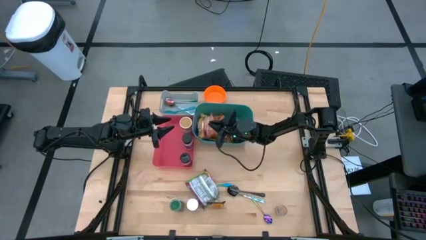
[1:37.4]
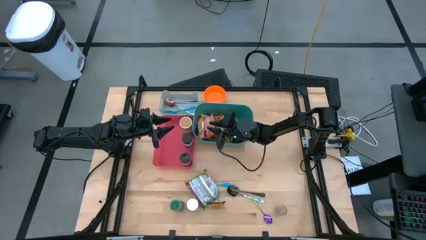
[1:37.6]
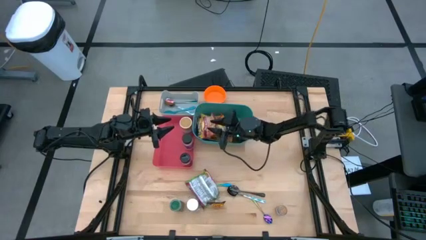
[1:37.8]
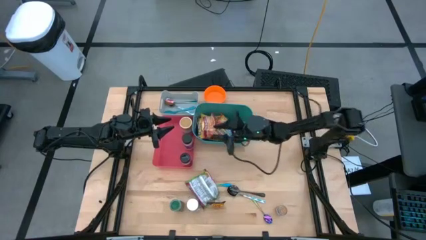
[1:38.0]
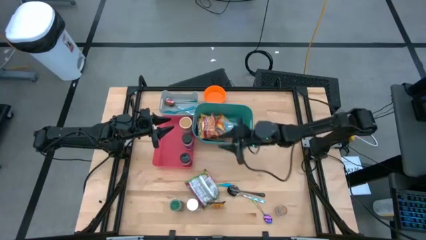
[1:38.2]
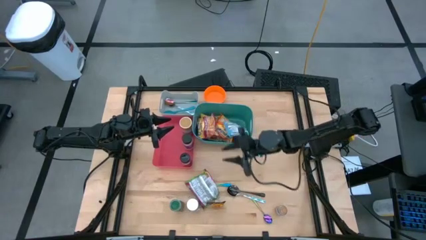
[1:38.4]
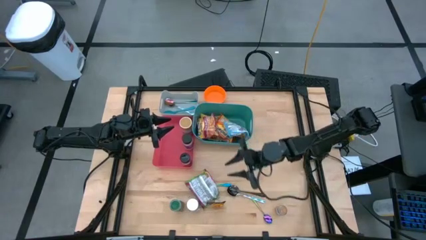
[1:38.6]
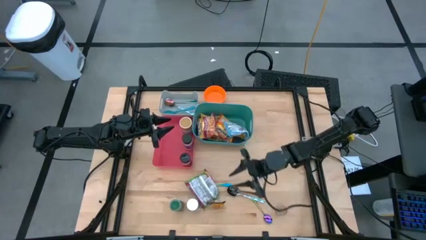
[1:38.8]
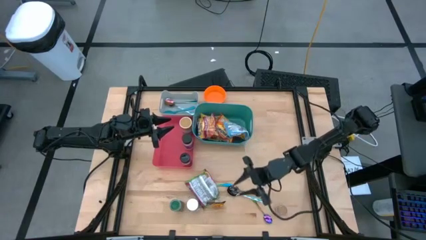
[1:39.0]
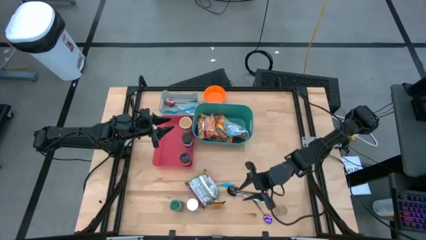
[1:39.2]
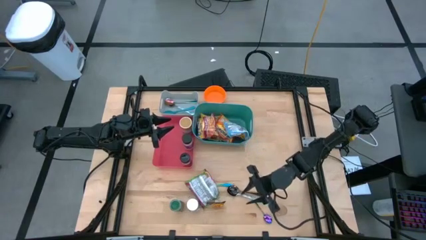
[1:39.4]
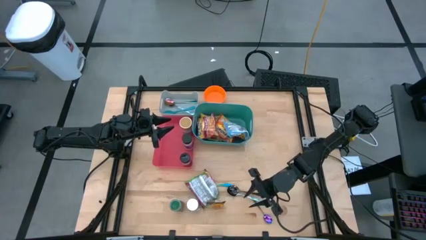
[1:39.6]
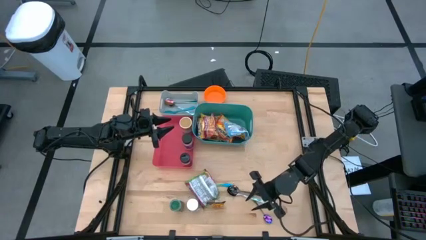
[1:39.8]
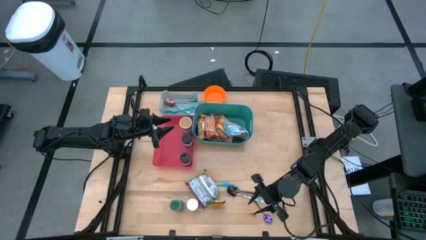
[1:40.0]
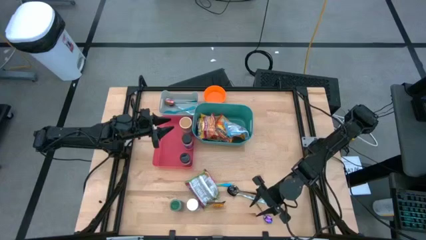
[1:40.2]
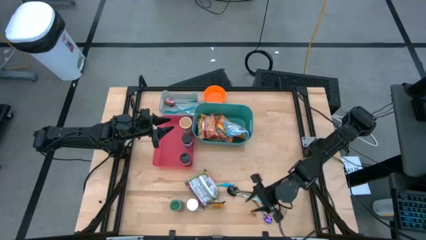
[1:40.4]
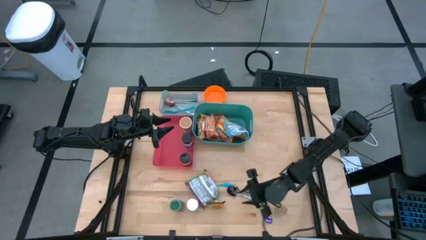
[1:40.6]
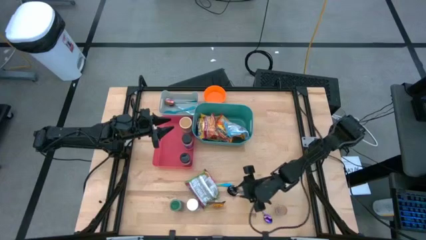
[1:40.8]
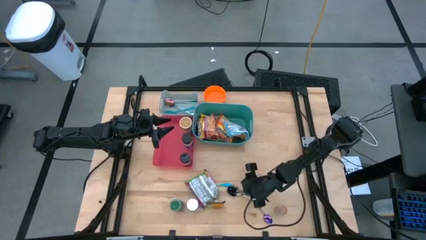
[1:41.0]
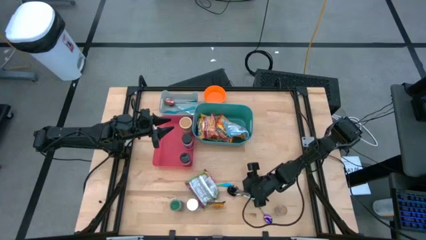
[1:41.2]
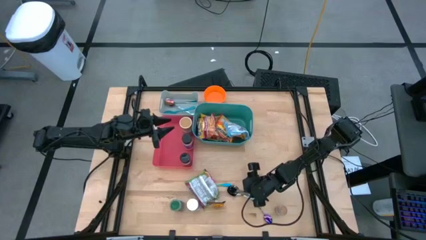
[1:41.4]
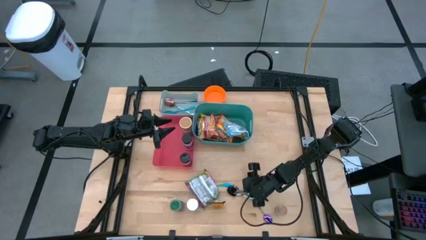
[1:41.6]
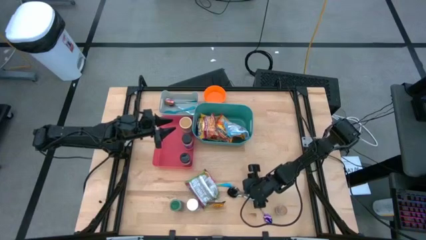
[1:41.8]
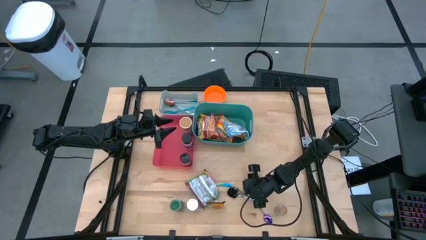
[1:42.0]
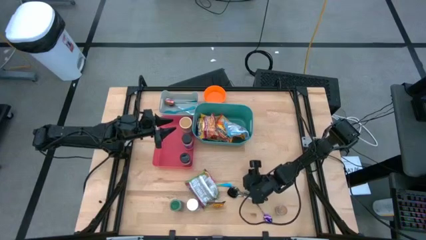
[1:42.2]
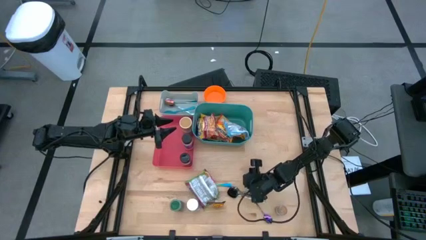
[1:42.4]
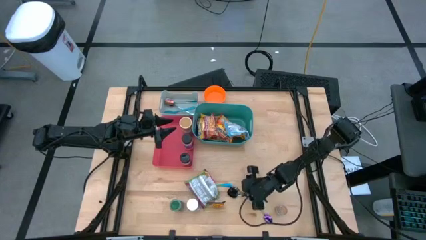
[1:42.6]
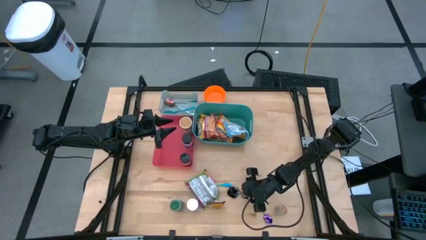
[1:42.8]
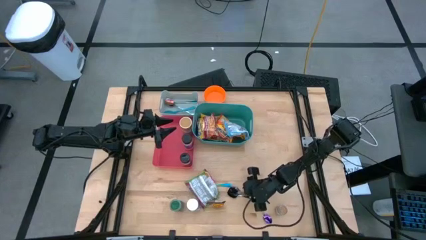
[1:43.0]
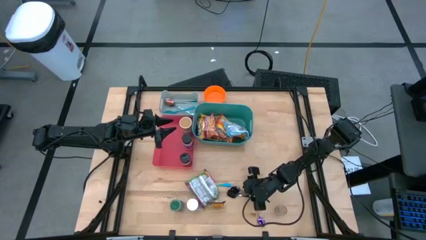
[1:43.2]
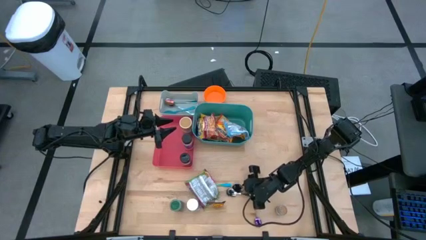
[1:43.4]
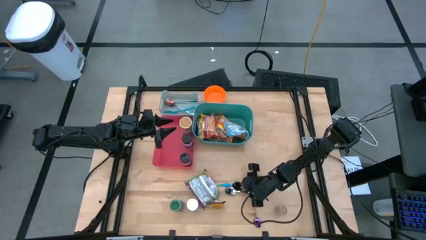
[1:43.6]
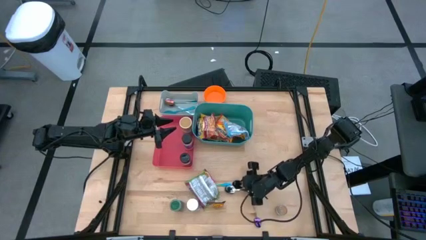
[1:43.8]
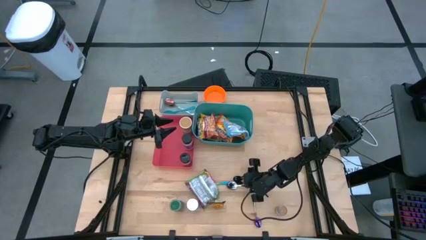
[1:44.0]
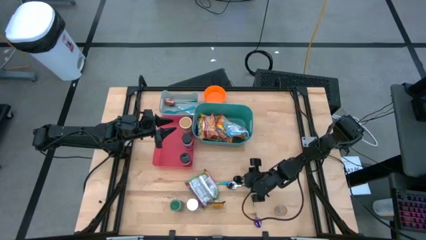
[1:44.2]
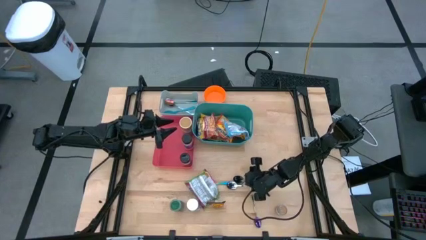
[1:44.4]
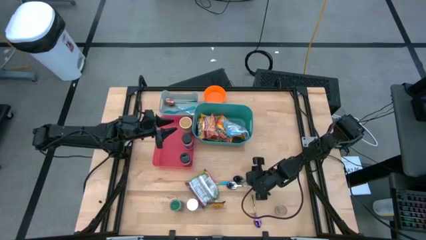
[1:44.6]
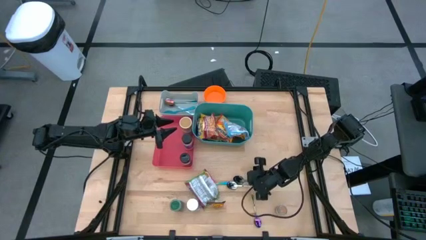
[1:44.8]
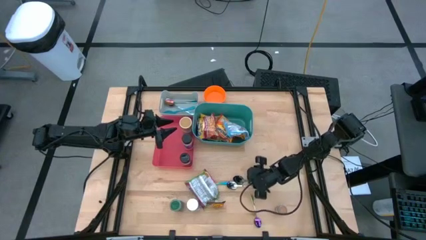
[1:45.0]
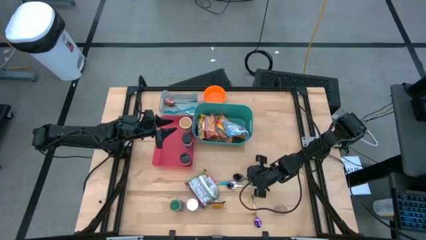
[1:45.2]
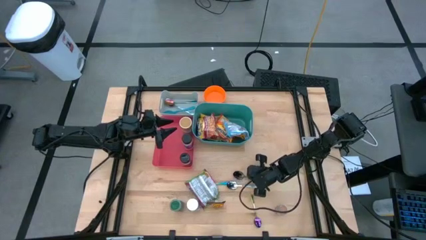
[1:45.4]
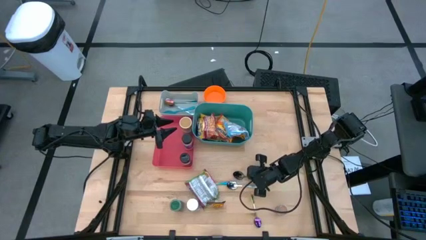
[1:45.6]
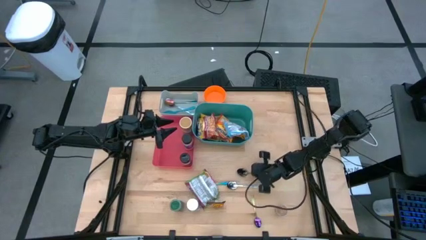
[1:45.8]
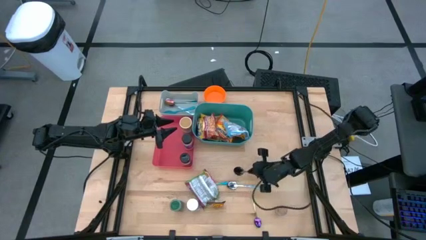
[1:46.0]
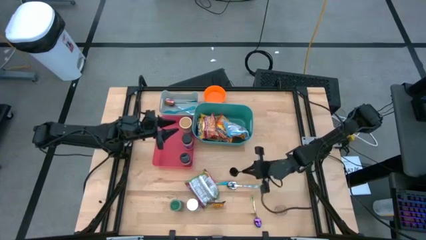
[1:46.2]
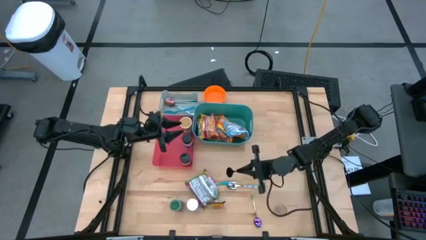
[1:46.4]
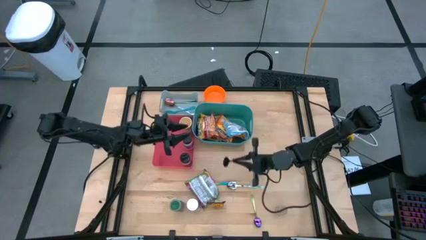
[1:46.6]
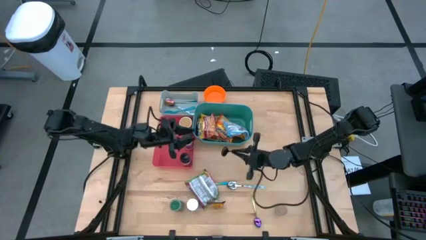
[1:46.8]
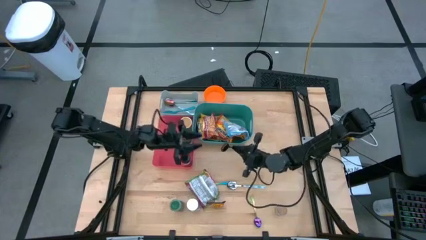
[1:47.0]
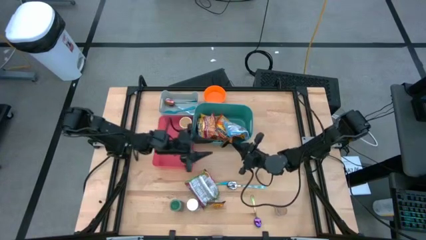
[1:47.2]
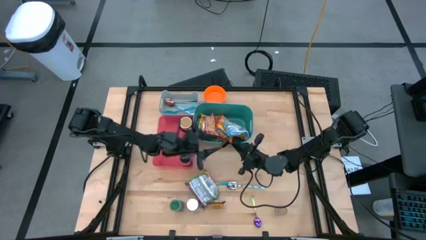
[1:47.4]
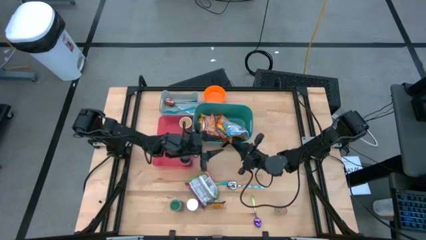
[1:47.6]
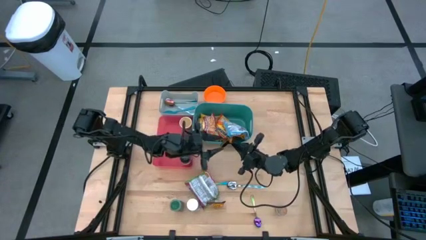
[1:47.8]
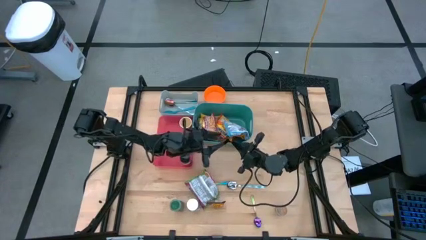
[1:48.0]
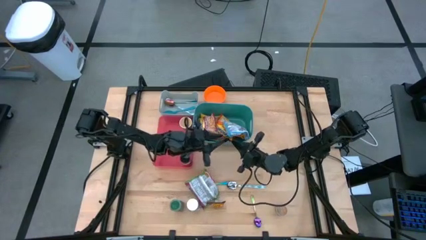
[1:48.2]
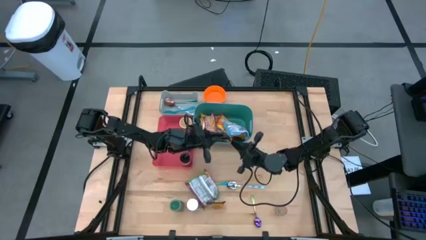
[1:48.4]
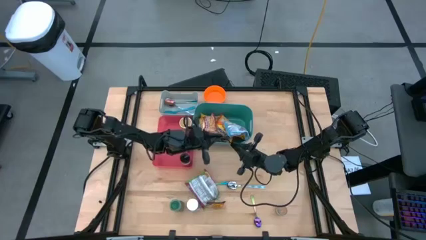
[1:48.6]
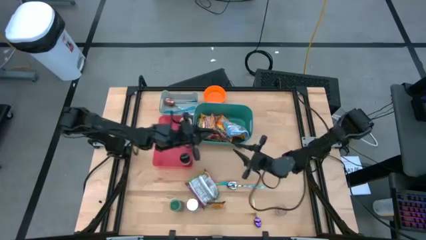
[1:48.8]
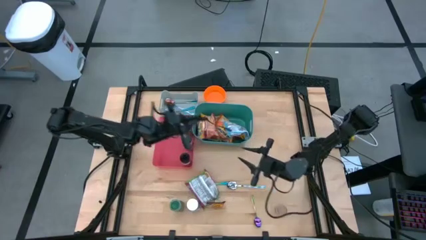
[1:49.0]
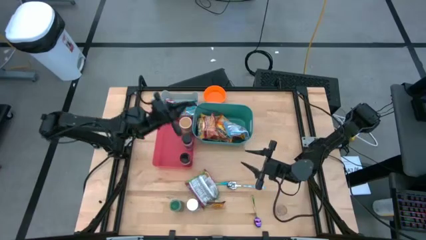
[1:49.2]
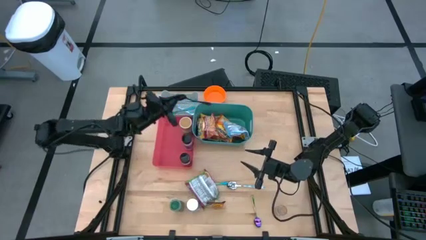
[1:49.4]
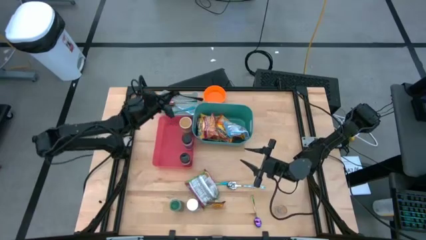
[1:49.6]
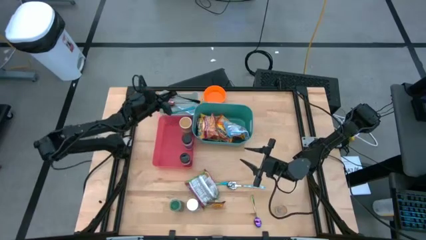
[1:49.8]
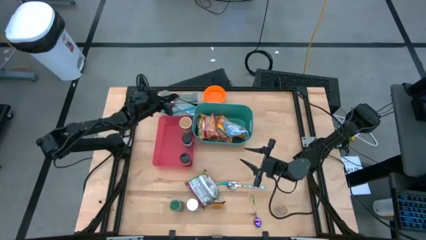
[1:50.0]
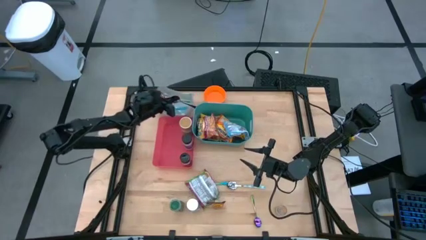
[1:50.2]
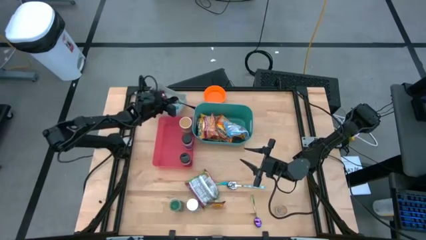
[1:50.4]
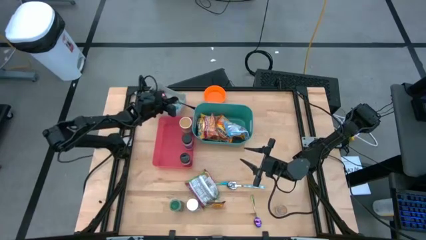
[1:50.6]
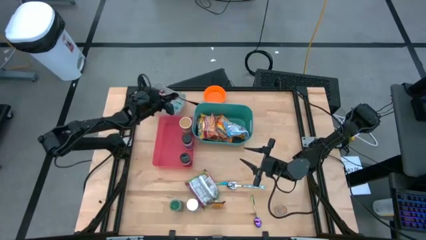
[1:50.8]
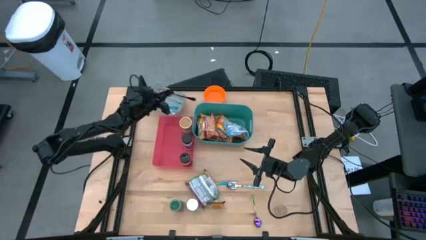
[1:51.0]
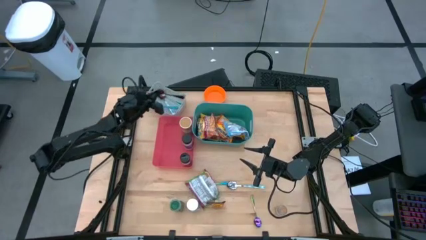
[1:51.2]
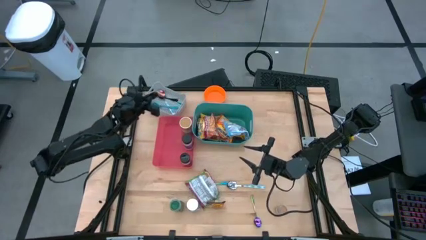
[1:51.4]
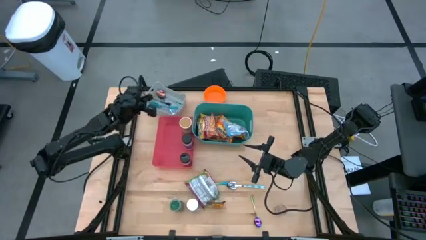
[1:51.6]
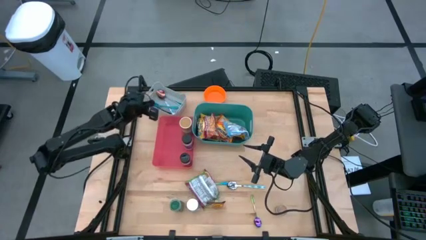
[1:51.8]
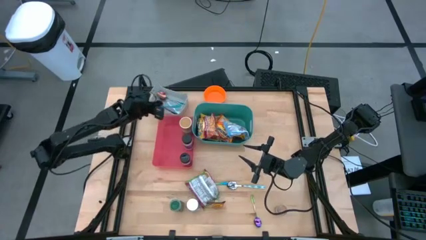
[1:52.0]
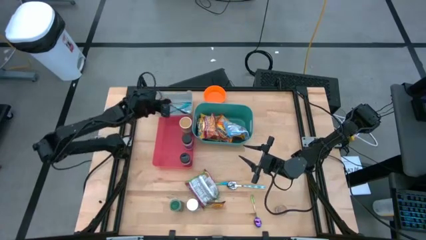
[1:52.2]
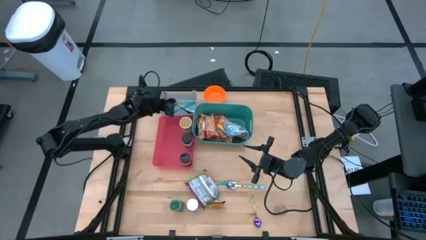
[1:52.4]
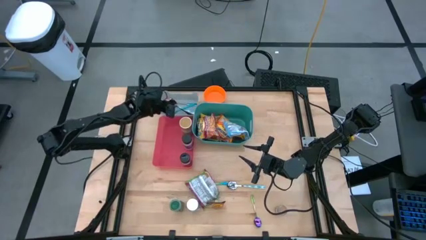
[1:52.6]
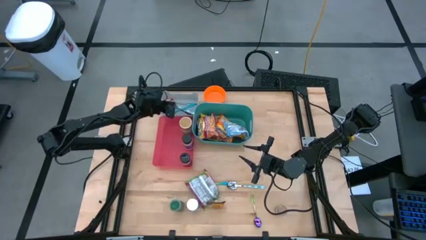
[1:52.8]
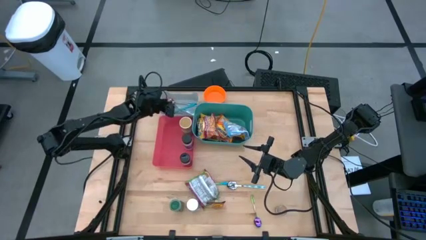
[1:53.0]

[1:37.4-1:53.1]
Task: Pick & Place Food Item
Put the black spoon into the gray bin

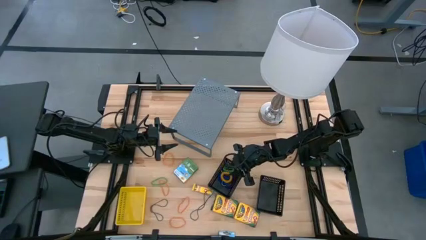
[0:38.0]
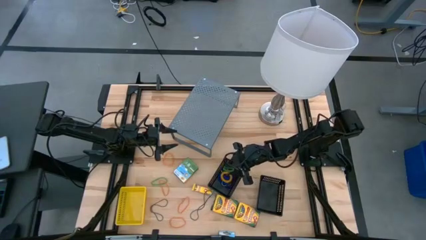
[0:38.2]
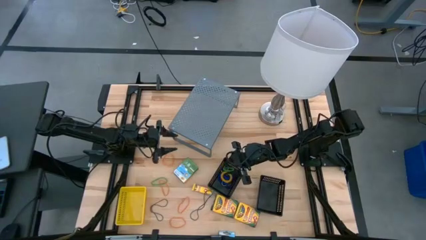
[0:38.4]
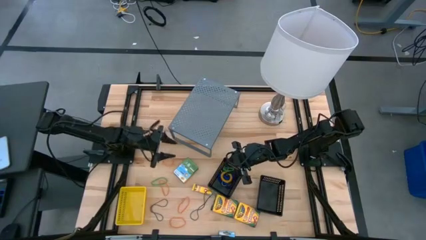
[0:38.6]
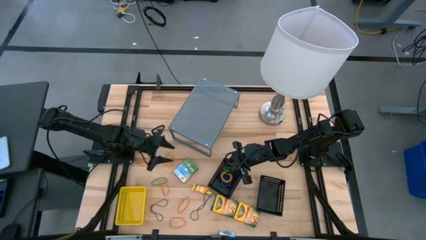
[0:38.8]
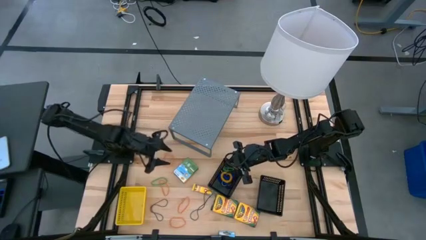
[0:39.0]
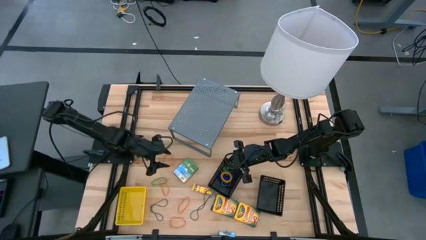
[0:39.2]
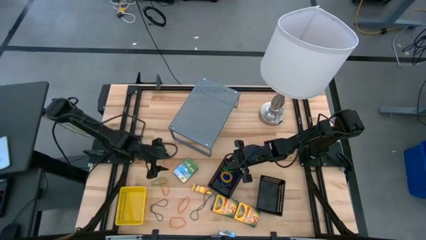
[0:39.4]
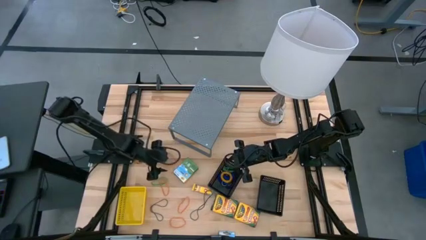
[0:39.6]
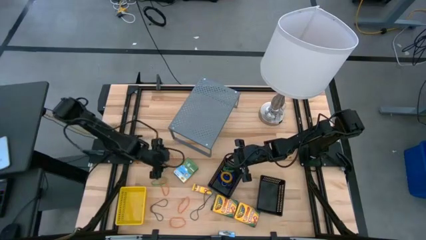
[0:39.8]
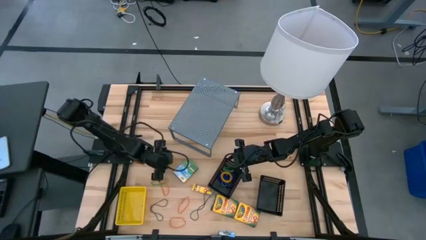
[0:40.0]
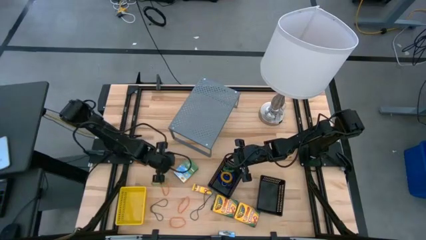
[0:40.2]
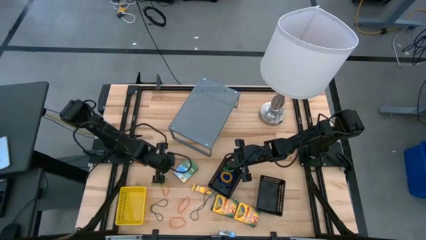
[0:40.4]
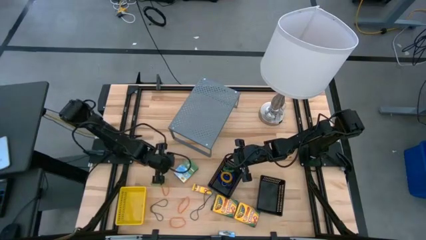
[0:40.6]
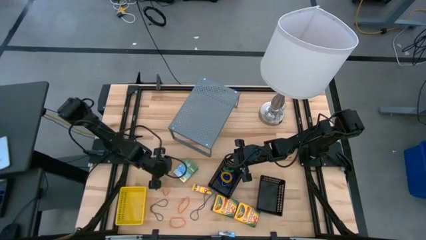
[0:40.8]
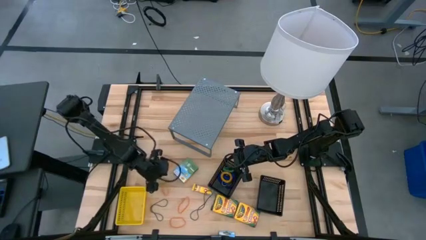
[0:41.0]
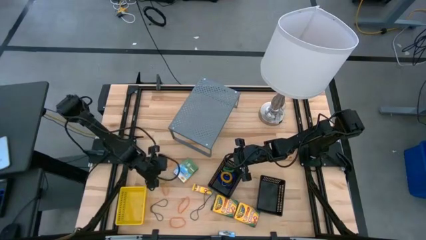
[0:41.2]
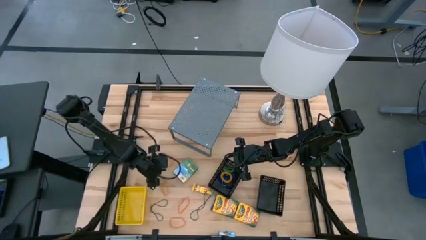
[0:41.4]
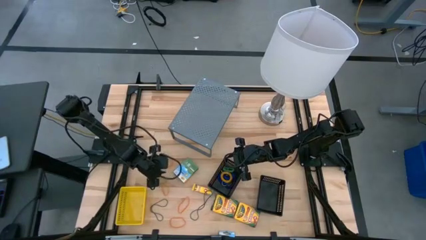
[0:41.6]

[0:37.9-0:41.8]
Task: Pick & Place Office Desk Supplies
Put the orange rubber band into the yellow bin
